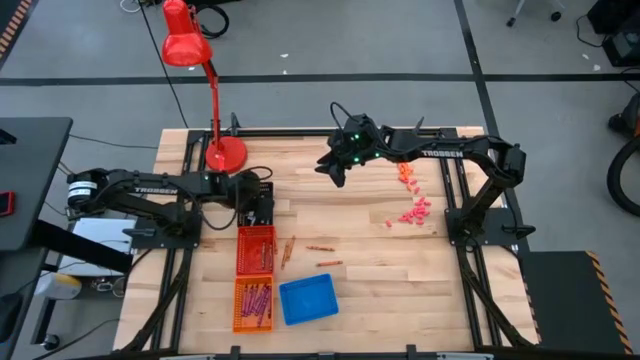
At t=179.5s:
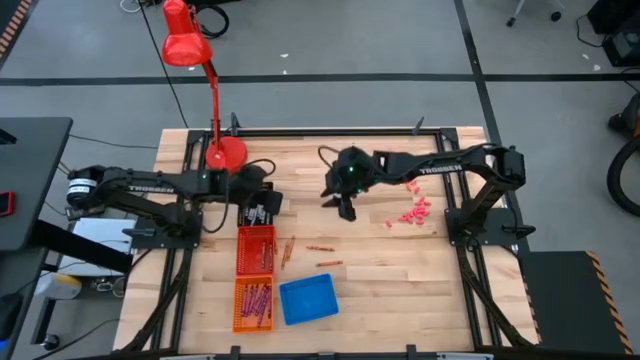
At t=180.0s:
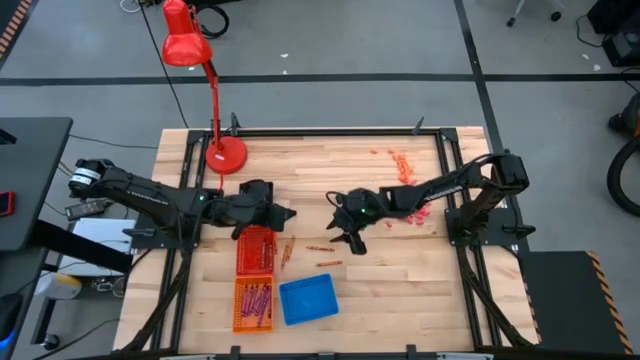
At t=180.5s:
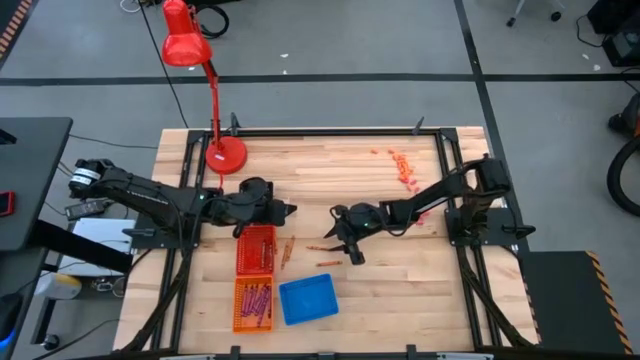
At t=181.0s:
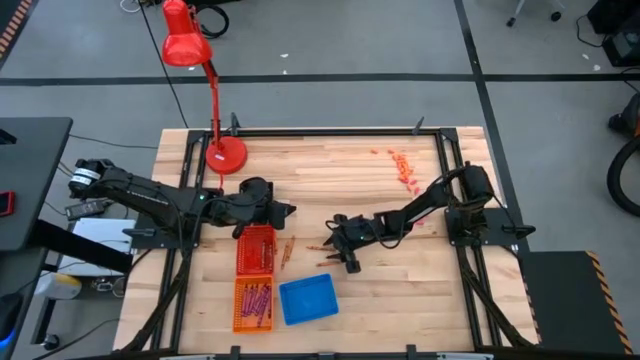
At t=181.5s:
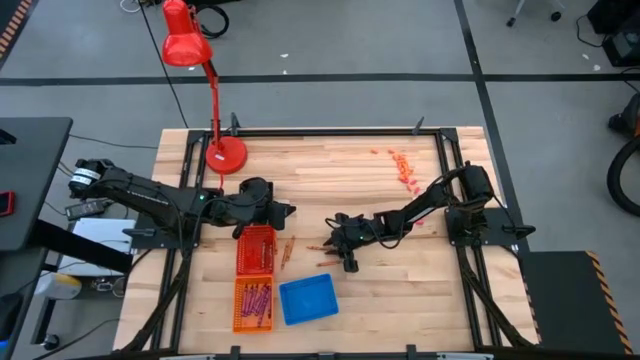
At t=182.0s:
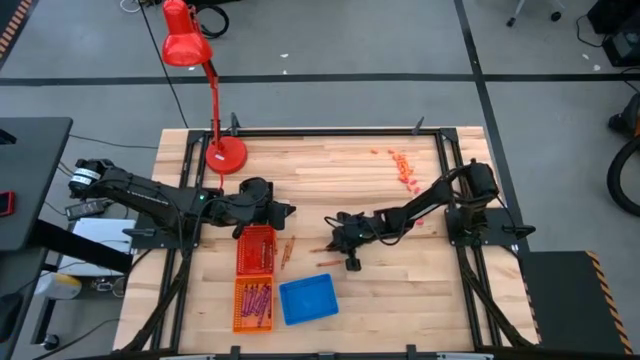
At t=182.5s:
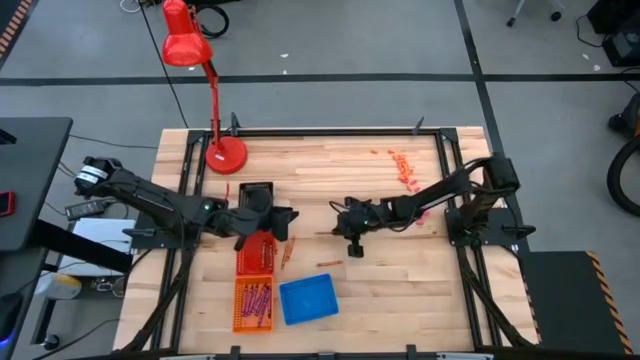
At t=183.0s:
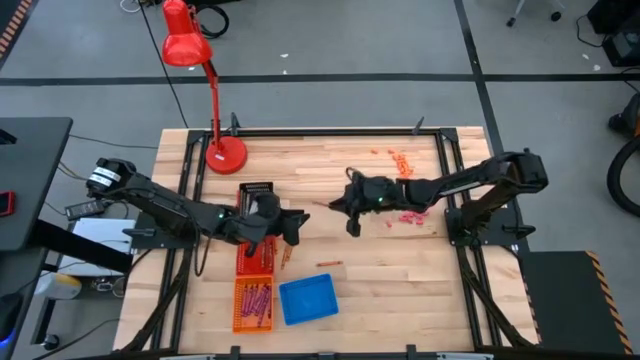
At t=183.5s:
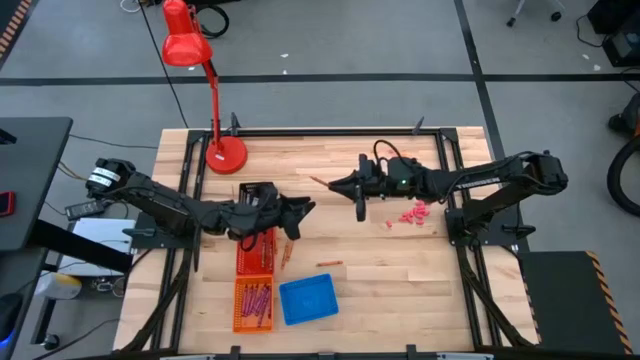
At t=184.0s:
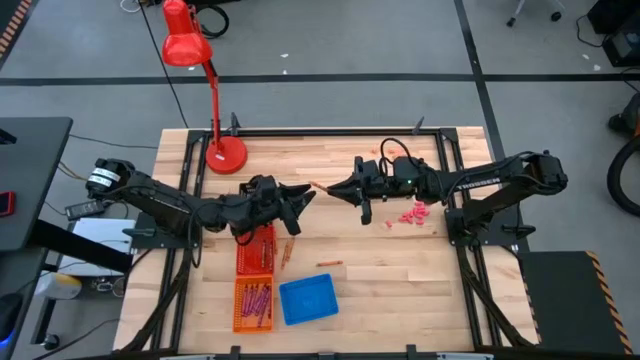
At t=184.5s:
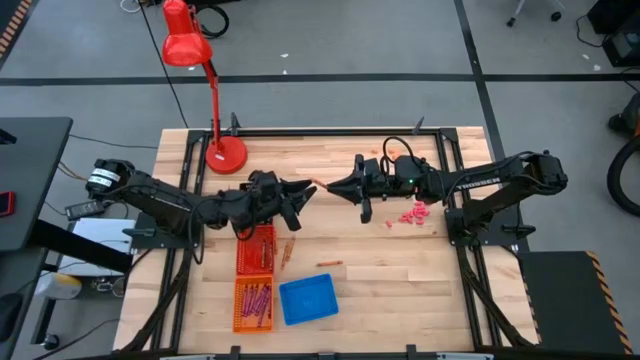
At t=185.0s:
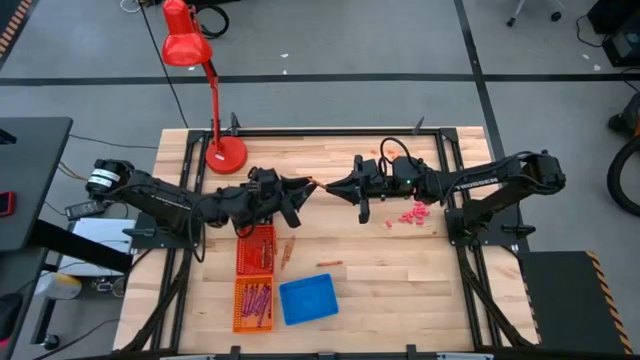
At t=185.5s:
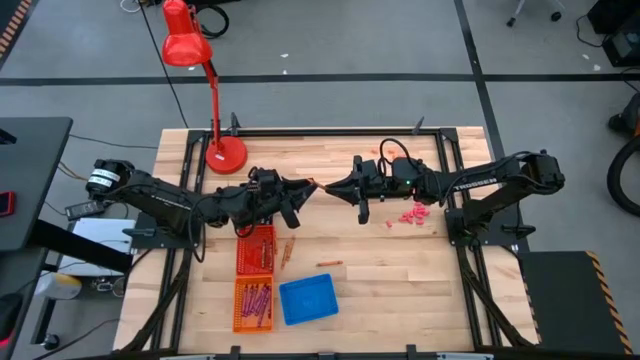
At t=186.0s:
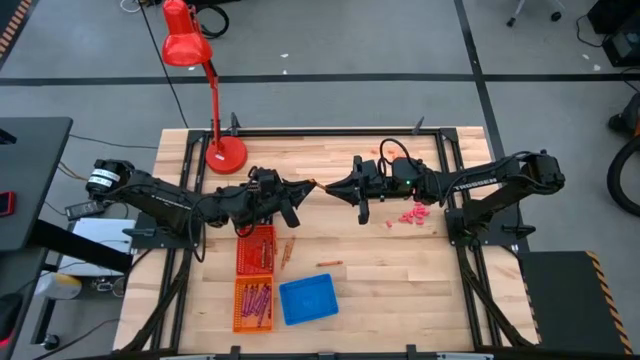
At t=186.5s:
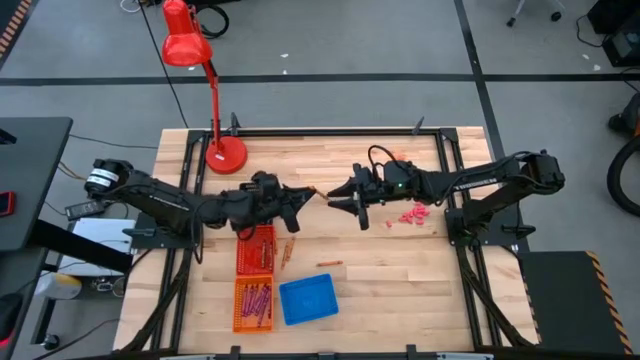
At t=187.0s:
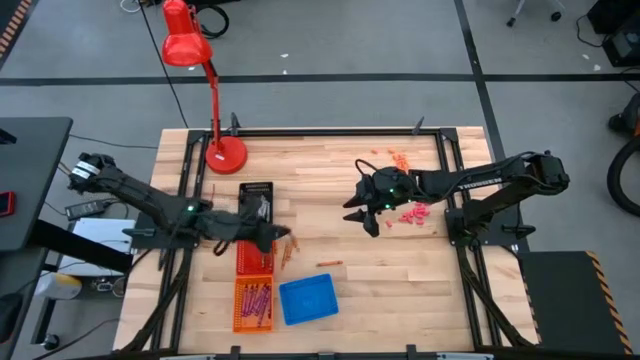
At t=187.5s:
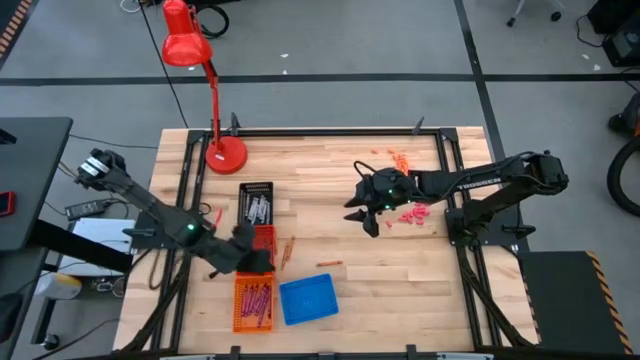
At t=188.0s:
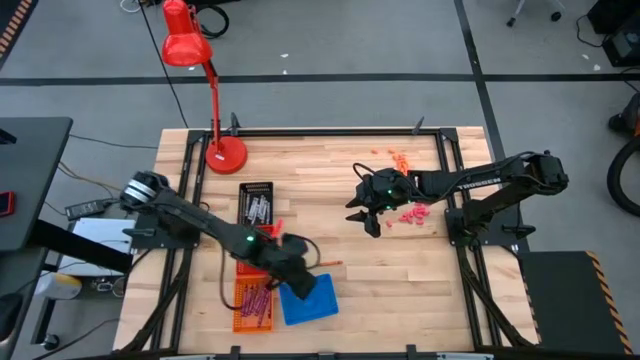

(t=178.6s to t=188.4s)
Task: Sort crayons
Put the orange crayon into the blue bin

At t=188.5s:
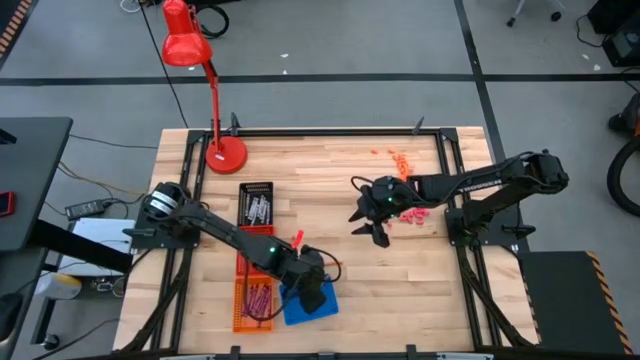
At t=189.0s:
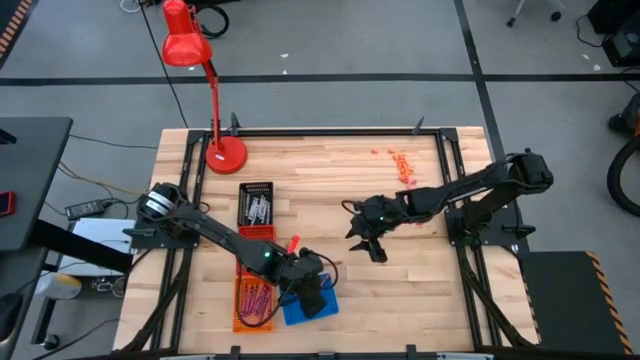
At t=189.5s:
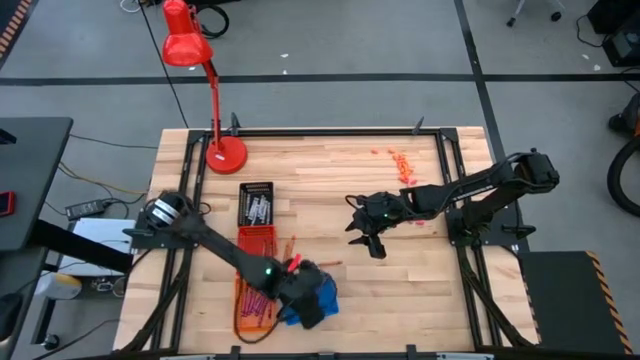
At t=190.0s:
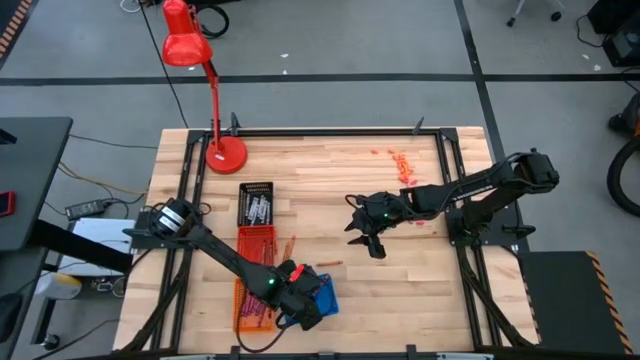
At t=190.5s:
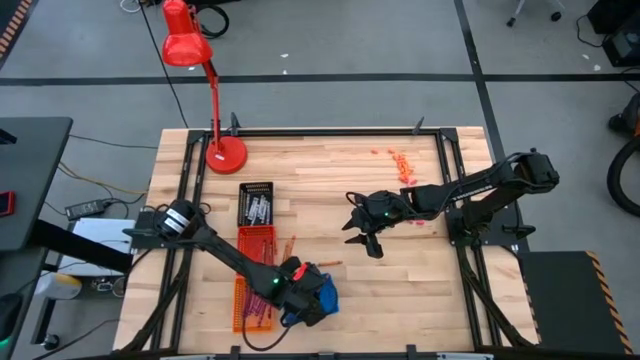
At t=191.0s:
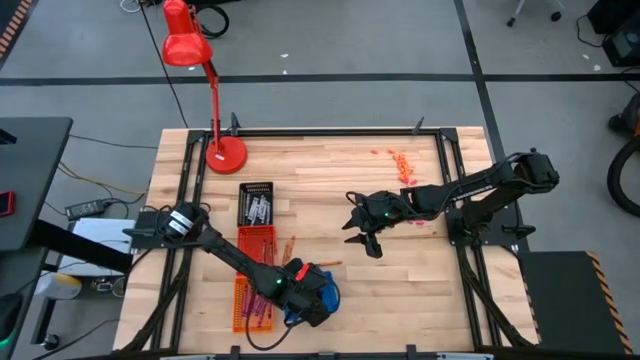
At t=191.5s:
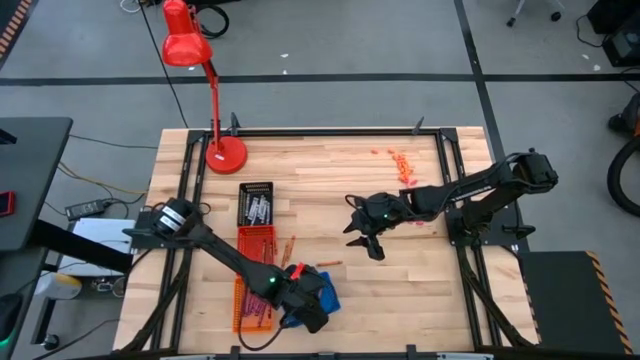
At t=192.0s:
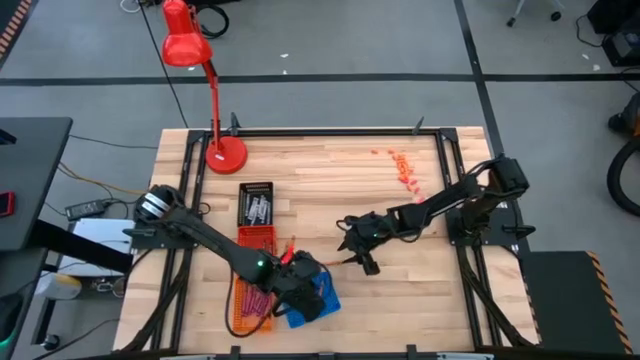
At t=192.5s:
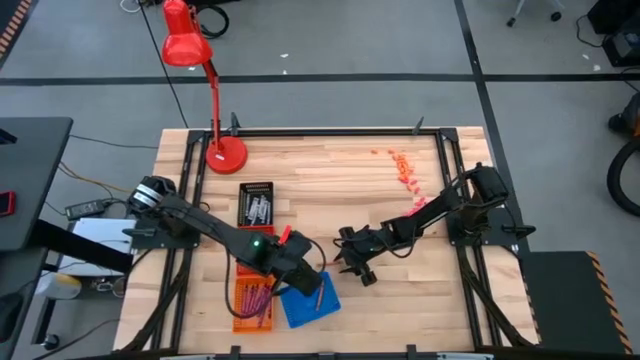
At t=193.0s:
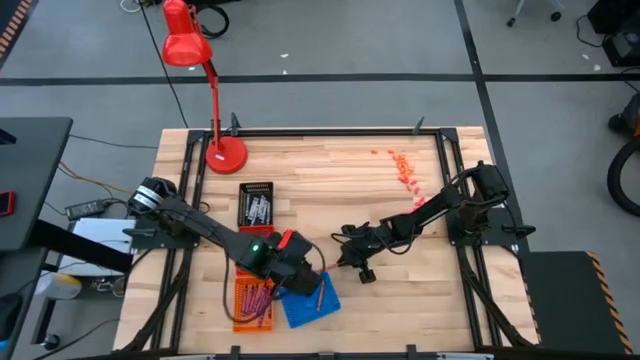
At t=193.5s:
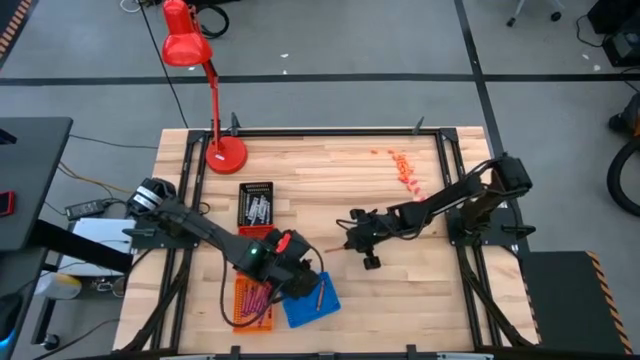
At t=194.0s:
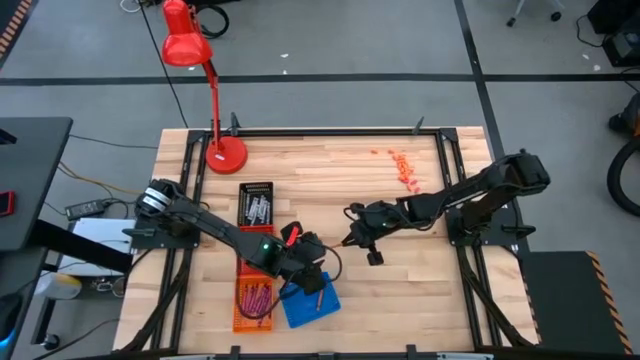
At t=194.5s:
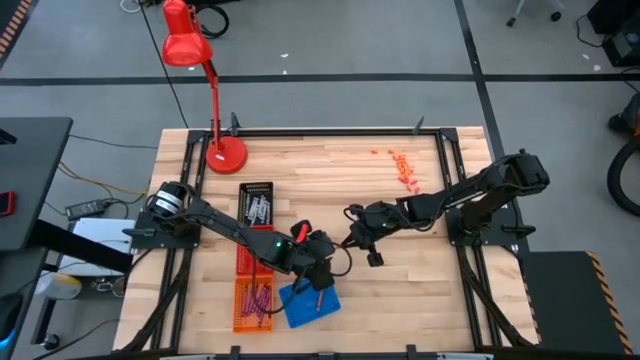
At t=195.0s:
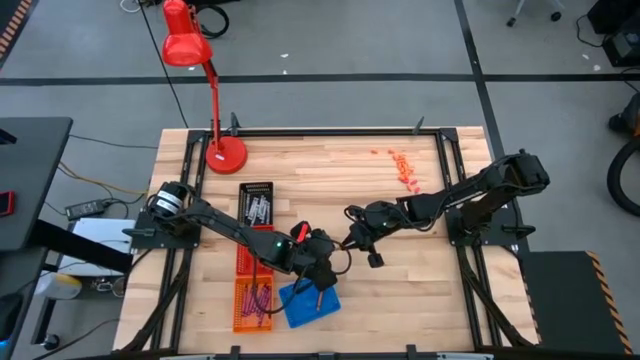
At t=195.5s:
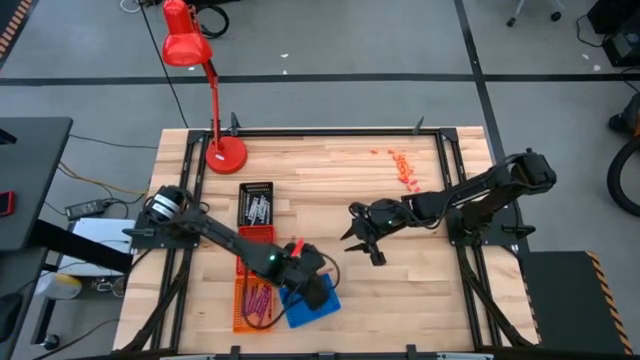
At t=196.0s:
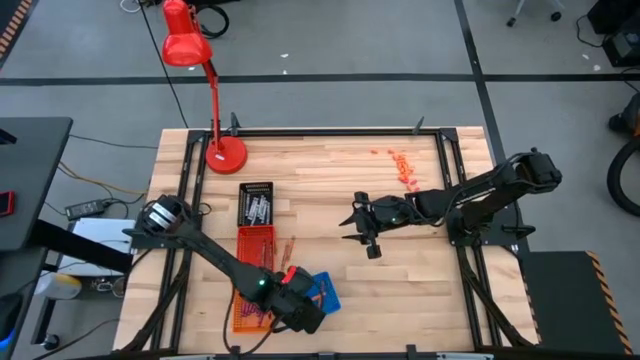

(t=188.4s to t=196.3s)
Put the orange crayon into the blue bin

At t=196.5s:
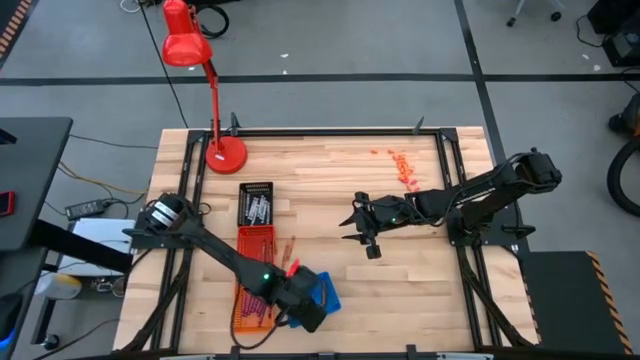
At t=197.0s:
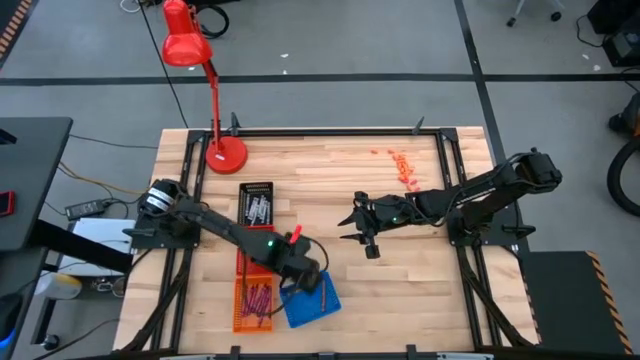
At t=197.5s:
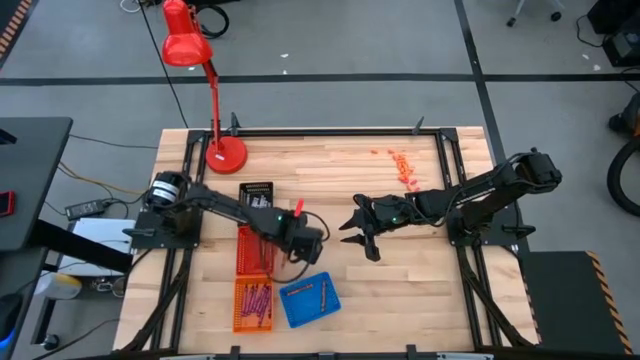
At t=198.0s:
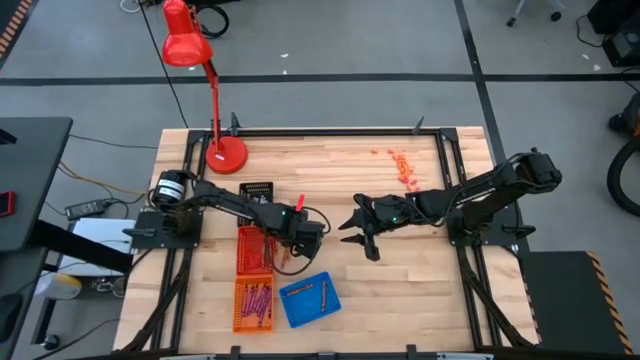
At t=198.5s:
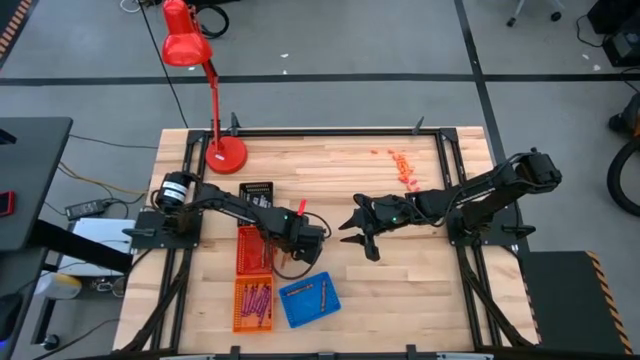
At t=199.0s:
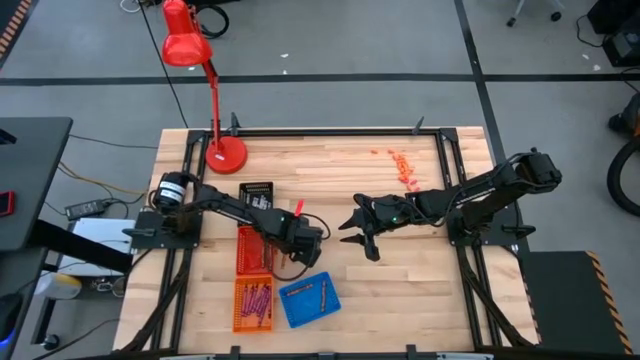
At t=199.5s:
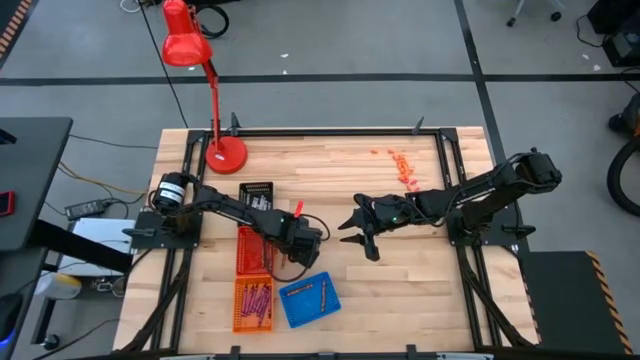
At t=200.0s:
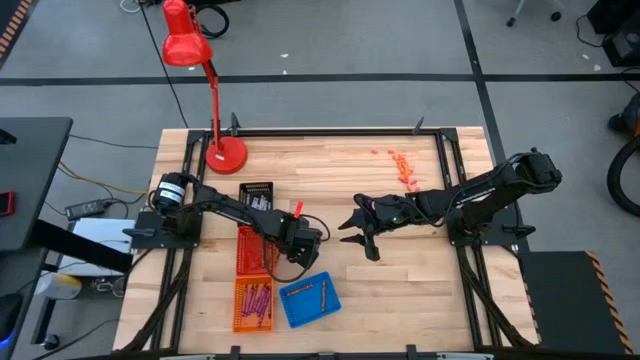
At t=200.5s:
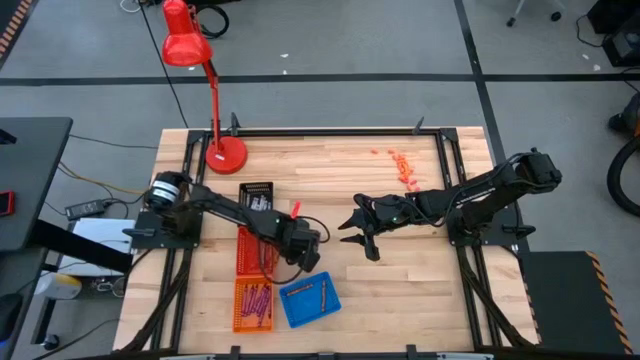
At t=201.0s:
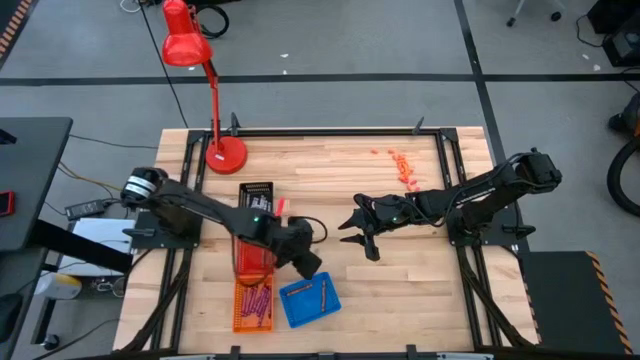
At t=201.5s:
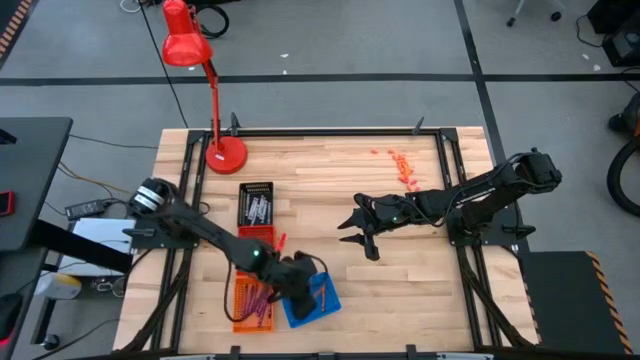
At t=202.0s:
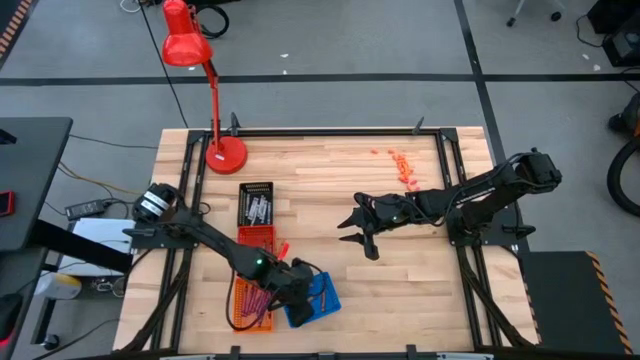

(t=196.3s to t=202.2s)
Put the orange crayon into the blue bin
